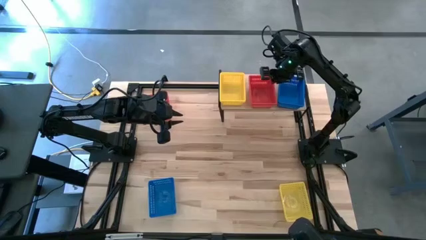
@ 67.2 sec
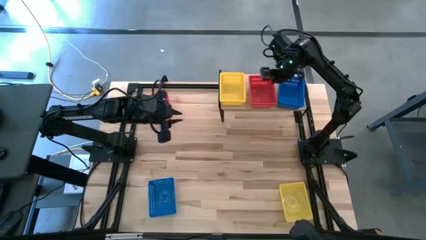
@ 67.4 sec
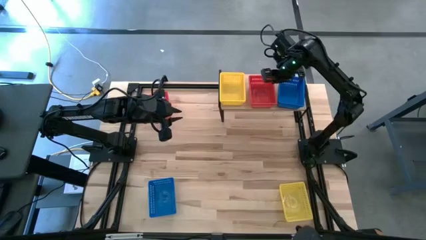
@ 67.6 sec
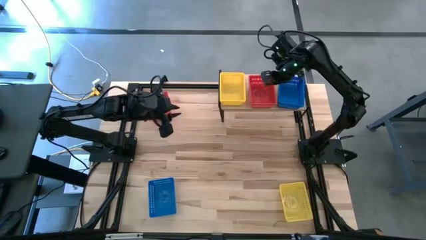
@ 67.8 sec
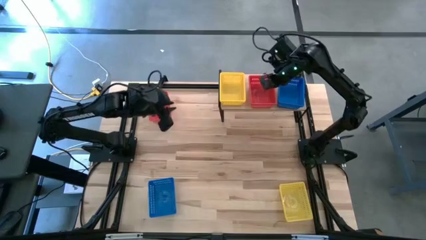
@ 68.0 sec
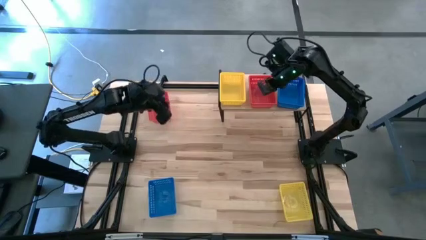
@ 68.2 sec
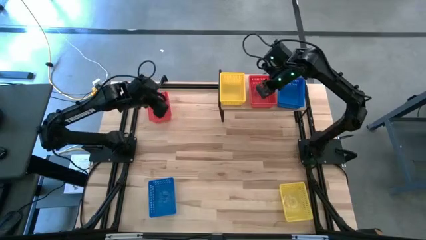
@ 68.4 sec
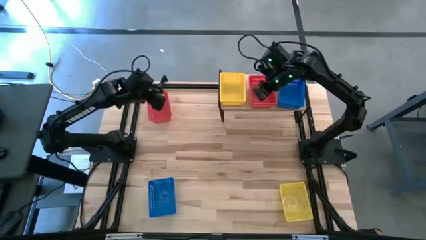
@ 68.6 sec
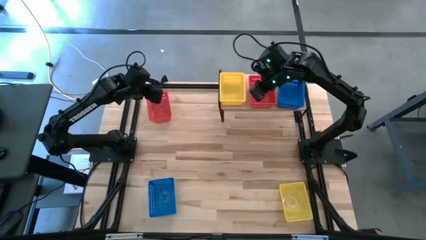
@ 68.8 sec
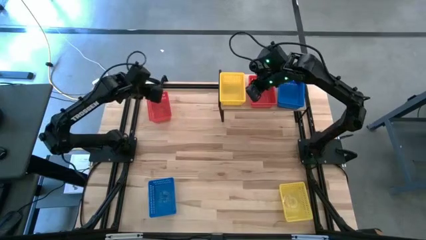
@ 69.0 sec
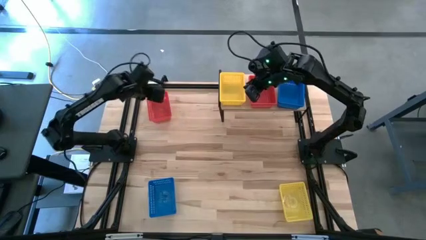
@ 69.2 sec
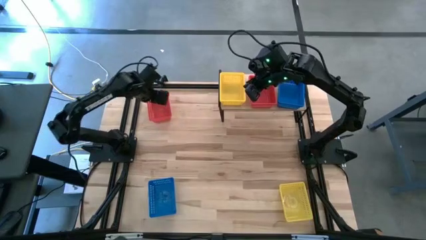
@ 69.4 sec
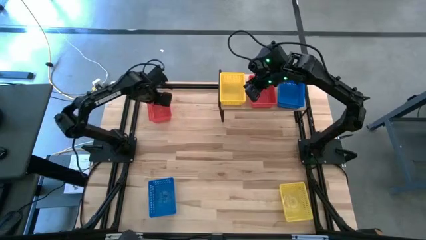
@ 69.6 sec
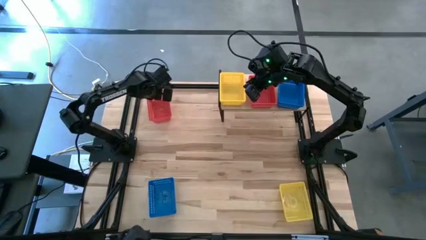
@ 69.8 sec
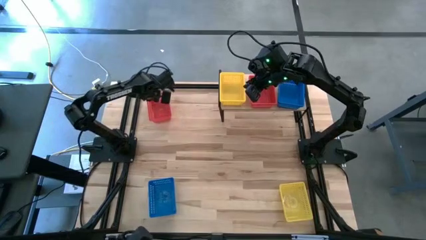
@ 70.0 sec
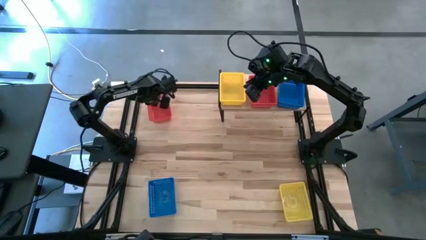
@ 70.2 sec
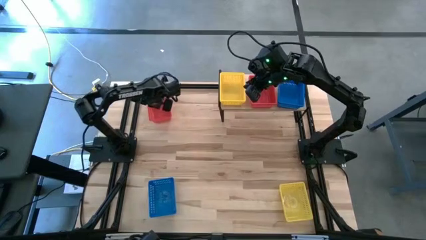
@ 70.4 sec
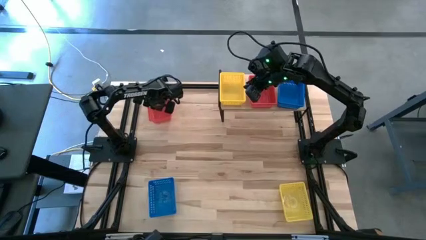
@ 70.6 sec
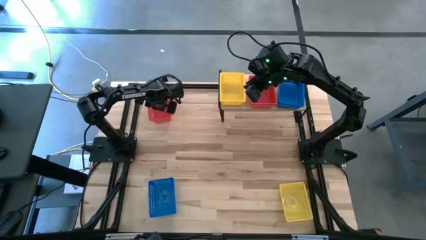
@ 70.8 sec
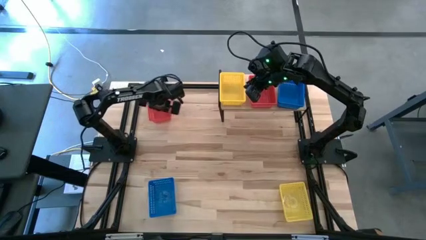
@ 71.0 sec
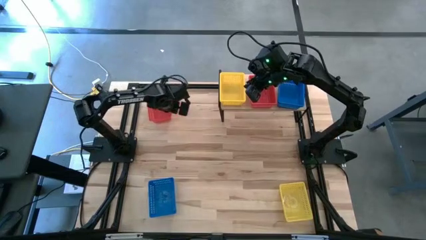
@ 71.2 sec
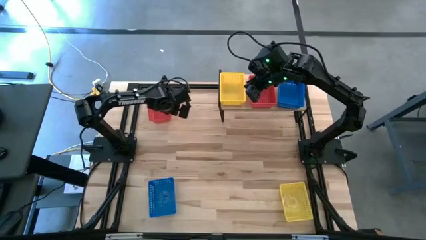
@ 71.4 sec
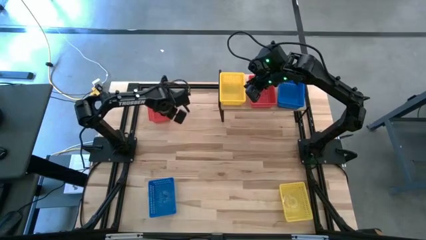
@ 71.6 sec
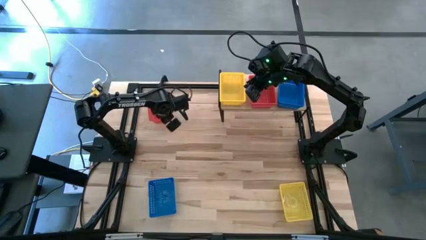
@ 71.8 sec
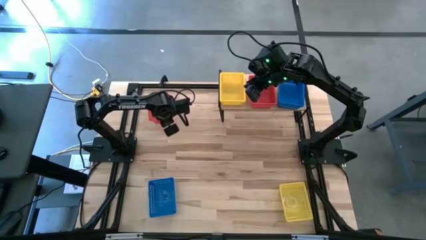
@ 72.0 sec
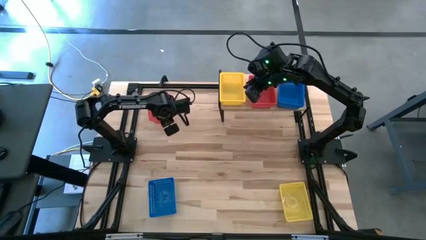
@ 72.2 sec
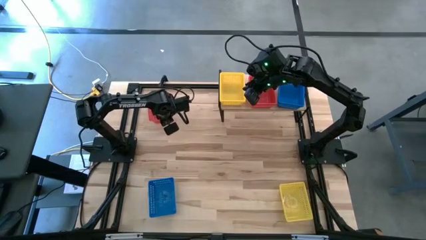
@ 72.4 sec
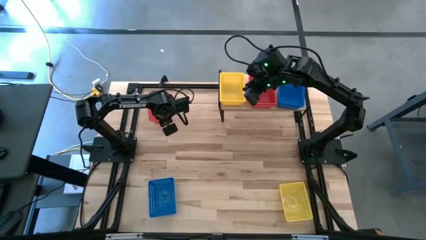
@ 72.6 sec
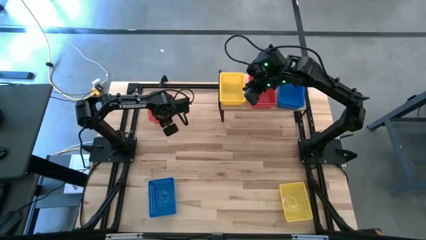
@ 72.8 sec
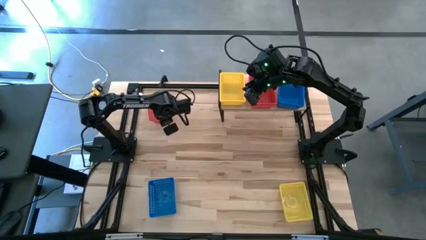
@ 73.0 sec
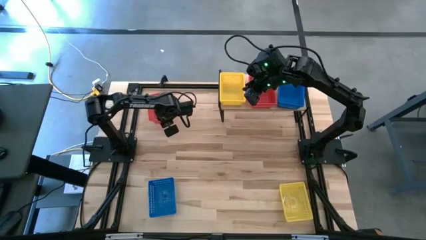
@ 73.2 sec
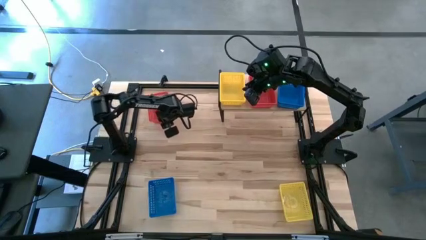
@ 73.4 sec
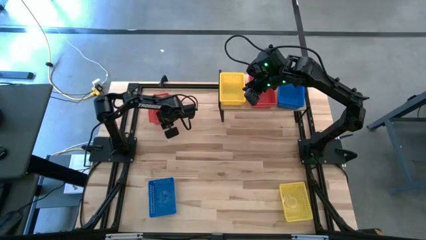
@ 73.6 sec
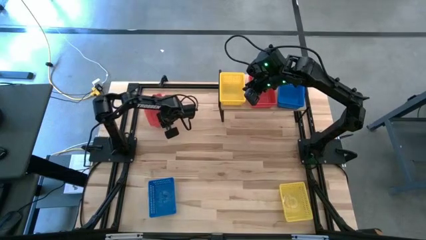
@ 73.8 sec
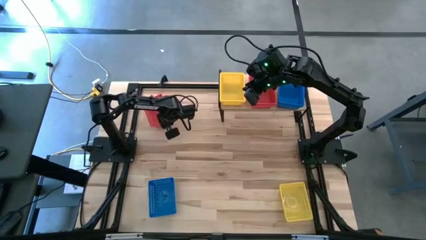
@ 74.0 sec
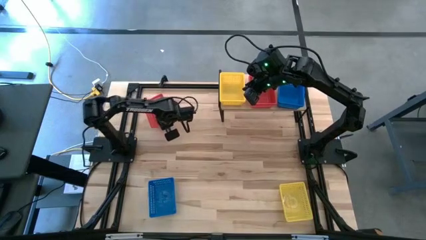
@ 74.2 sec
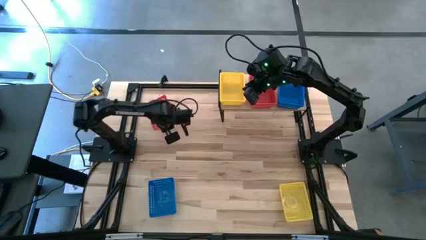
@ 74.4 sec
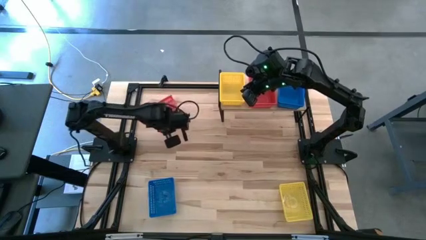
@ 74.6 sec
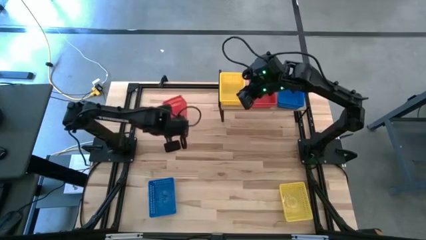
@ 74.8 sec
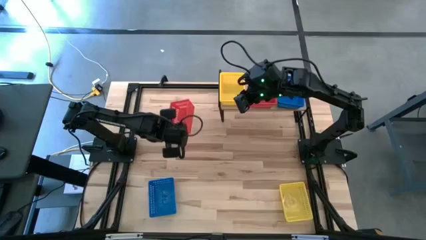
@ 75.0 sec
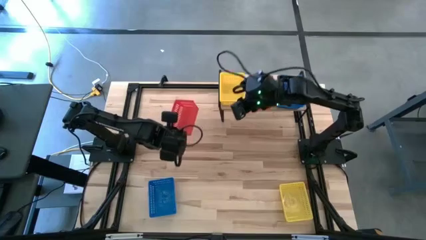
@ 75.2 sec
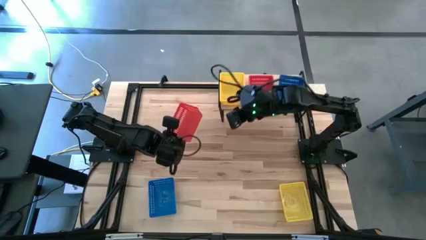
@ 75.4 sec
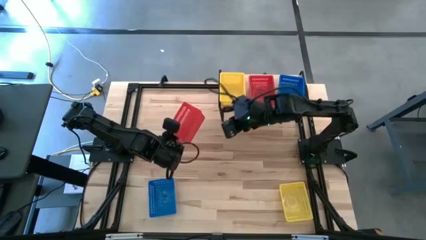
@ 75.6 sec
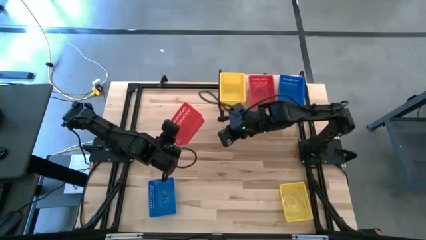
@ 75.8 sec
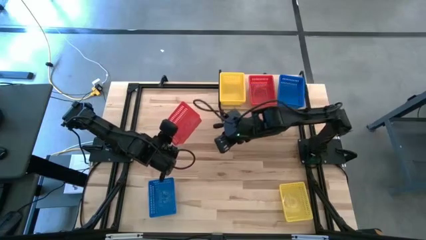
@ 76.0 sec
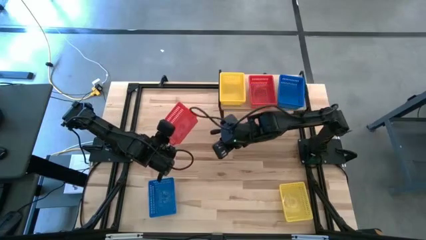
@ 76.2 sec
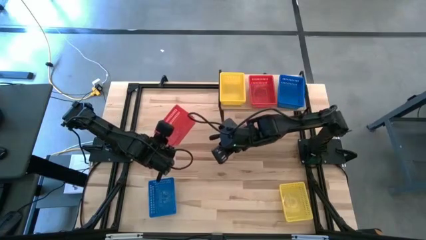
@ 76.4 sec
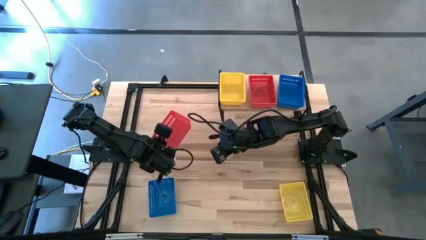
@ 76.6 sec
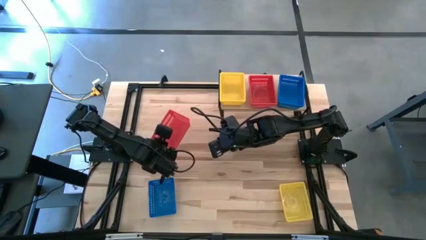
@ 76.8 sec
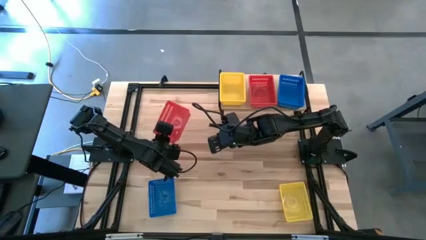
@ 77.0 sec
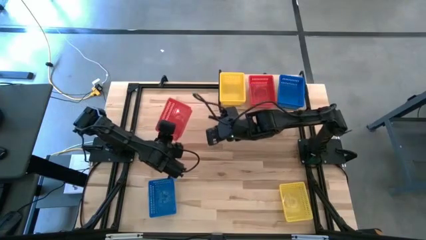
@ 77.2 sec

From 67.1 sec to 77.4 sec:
Task: Stack baskets on shelf by color
Stack the red basket on the stacked red baskets on the shelf
